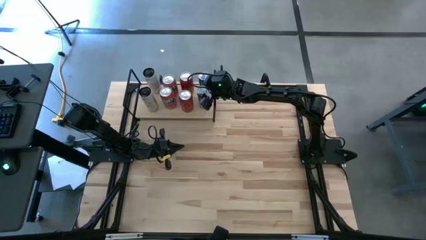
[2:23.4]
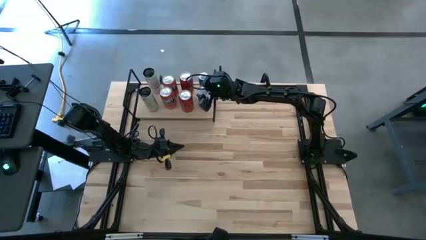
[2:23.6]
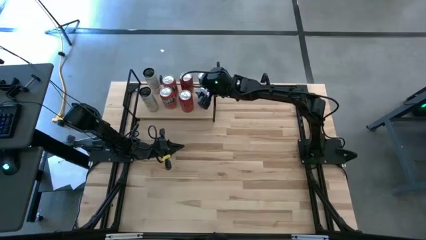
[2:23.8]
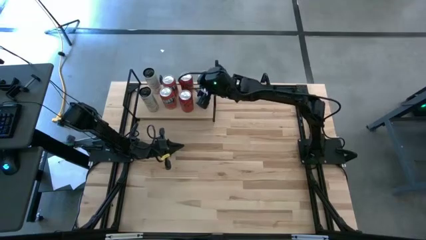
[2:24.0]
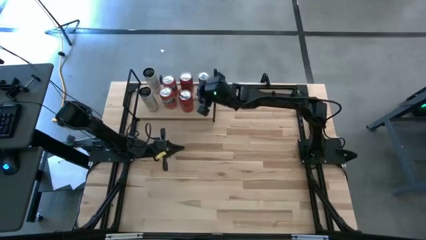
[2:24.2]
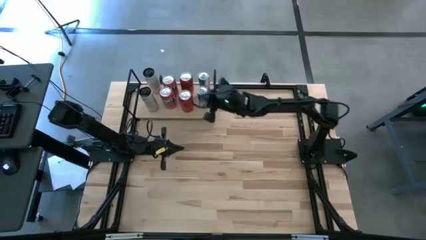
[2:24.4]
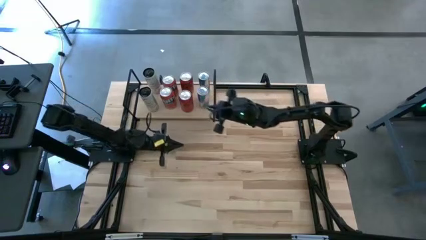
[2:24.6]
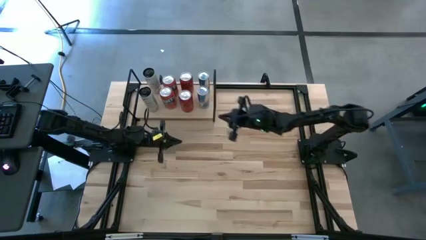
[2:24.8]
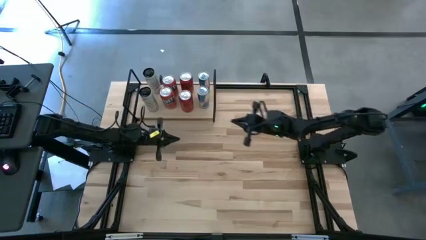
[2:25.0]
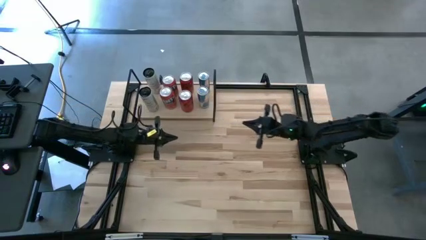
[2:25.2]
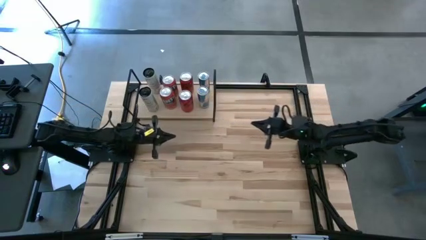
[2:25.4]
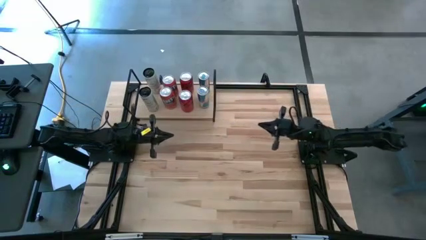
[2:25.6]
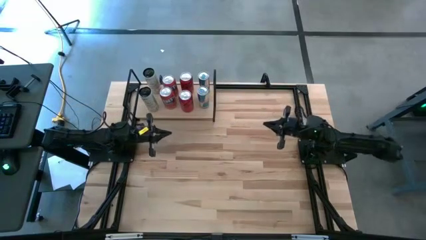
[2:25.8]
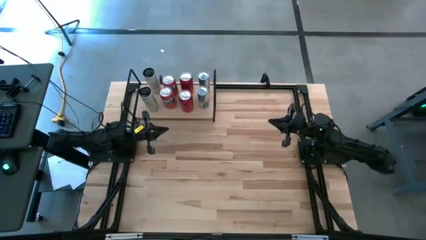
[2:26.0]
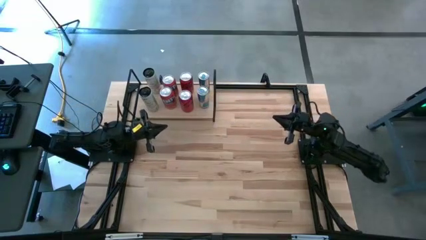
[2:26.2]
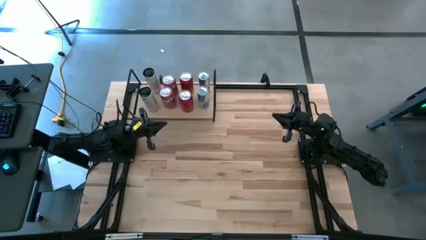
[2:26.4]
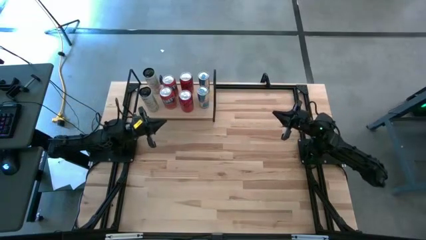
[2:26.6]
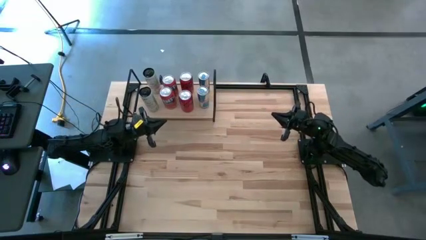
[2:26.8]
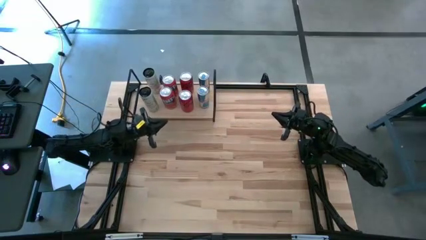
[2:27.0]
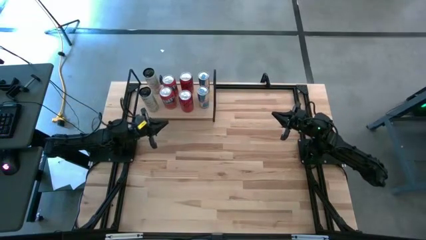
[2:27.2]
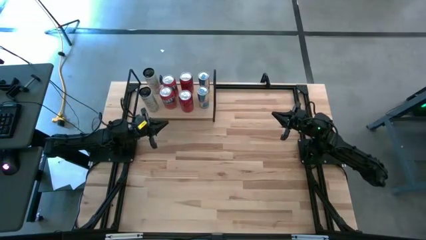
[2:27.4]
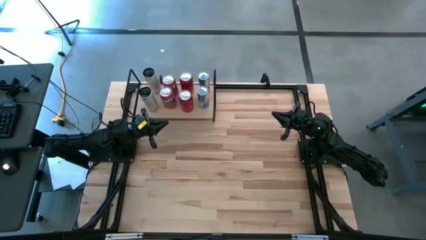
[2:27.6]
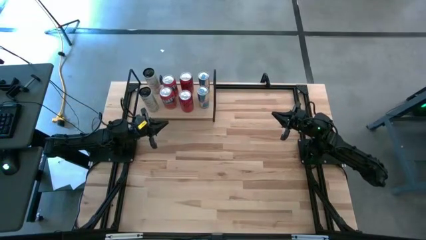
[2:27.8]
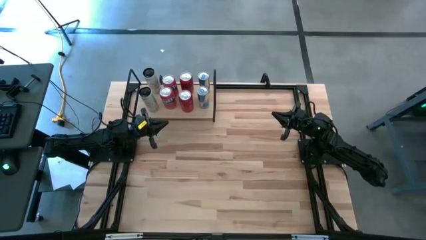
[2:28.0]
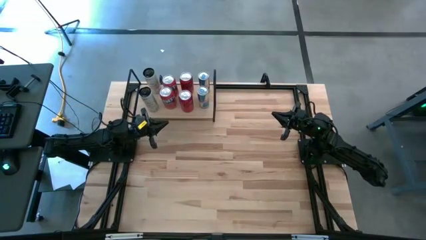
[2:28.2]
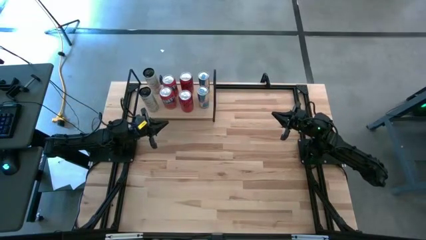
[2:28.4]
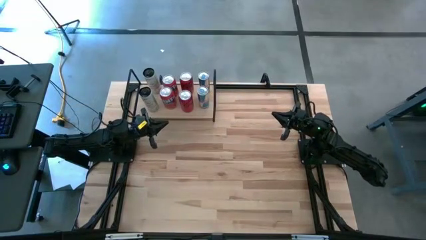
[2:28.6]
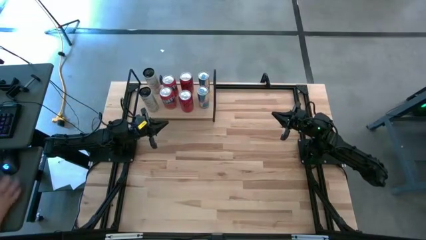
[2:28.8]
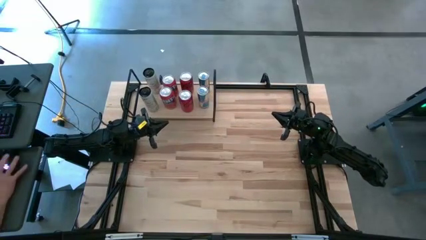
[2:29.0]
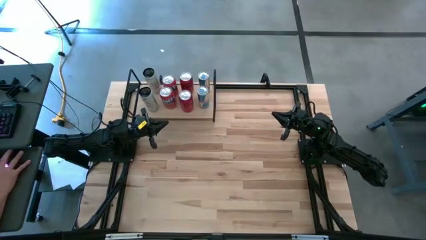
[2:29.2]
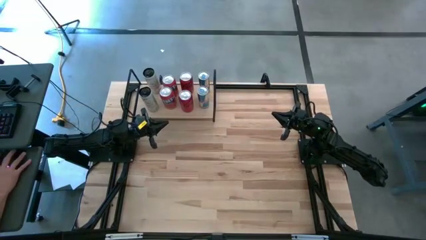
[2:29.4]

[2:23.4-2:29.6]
Task: Place canned beverage on shelf
Return to Home Position
